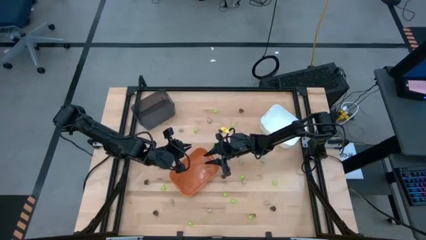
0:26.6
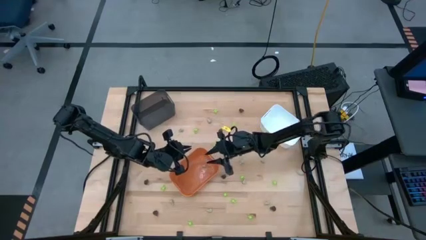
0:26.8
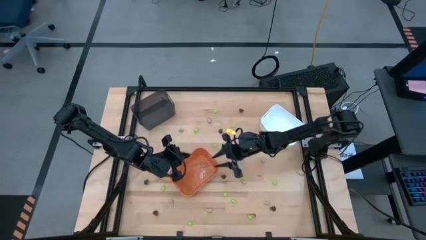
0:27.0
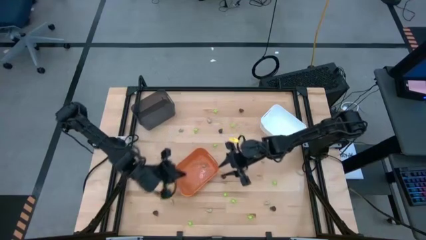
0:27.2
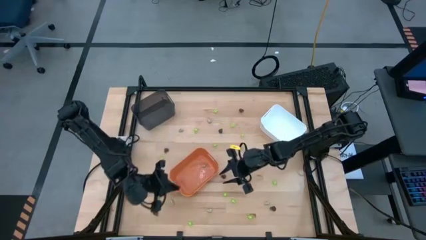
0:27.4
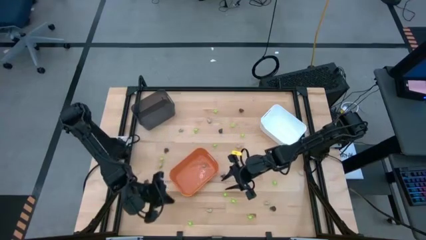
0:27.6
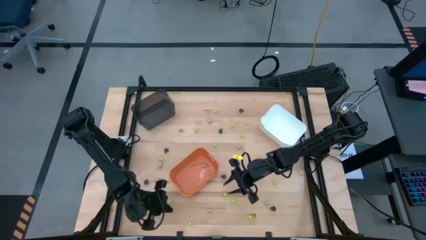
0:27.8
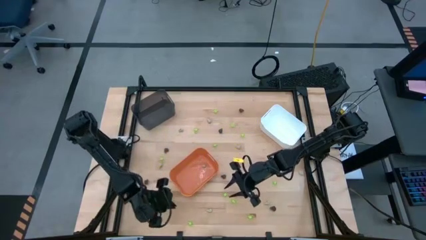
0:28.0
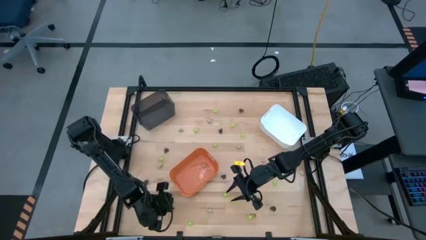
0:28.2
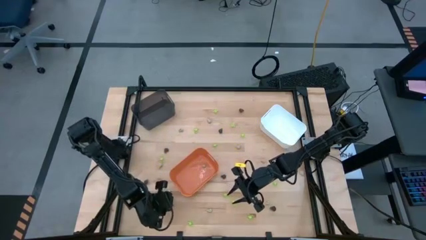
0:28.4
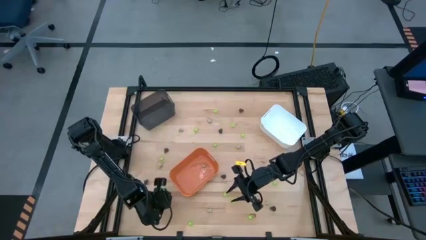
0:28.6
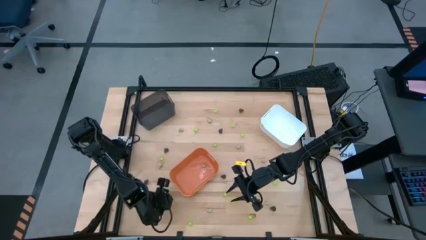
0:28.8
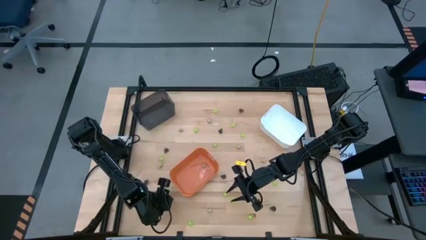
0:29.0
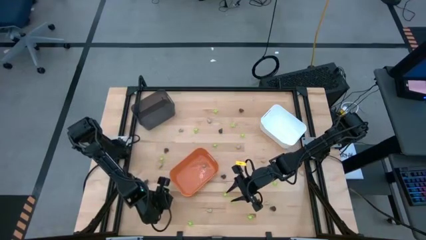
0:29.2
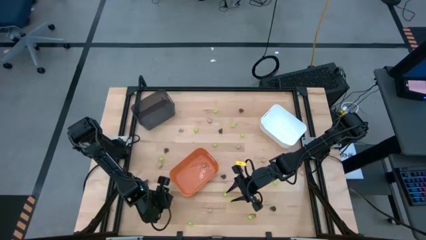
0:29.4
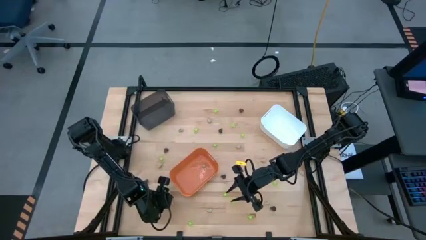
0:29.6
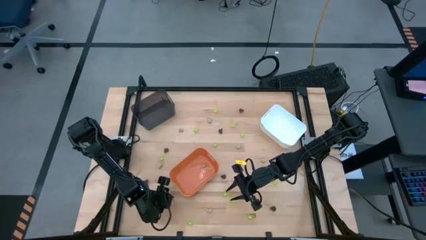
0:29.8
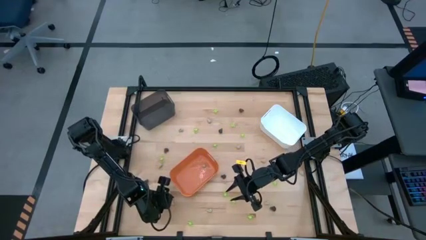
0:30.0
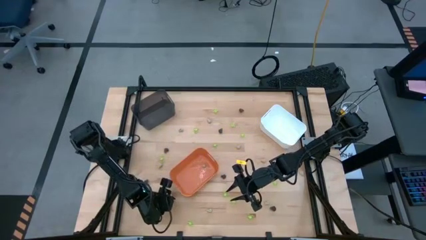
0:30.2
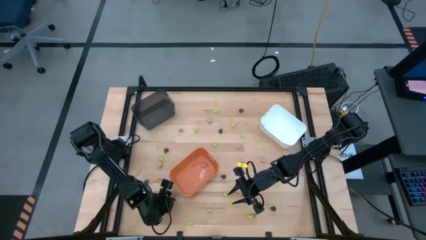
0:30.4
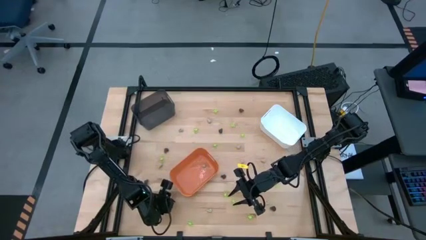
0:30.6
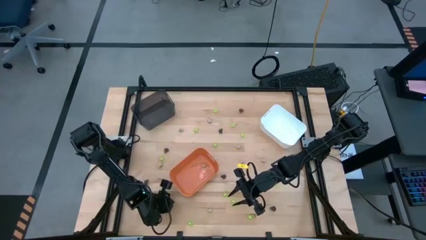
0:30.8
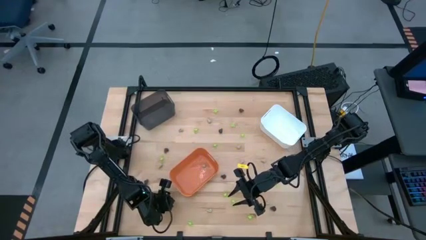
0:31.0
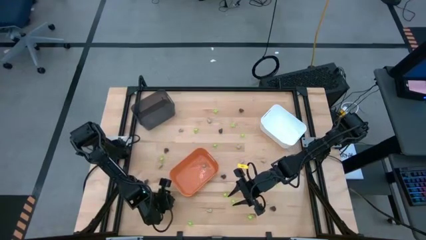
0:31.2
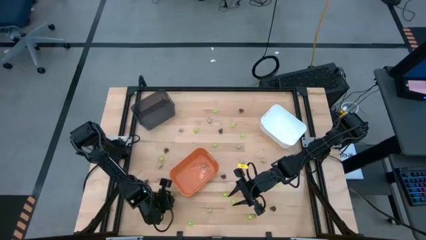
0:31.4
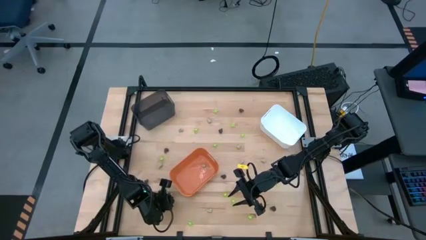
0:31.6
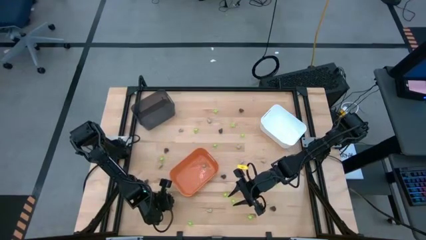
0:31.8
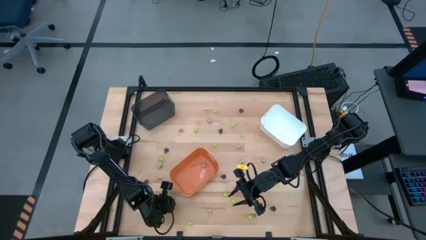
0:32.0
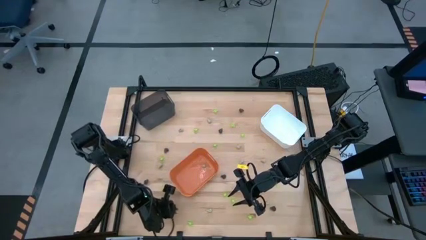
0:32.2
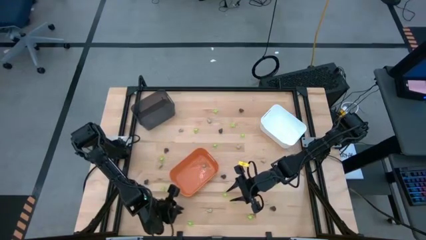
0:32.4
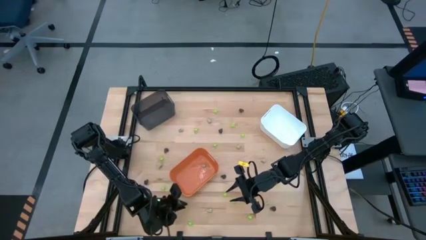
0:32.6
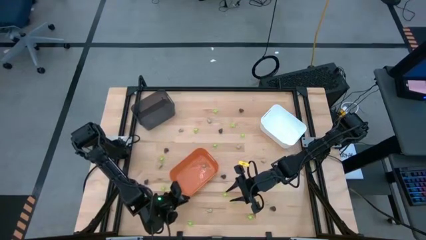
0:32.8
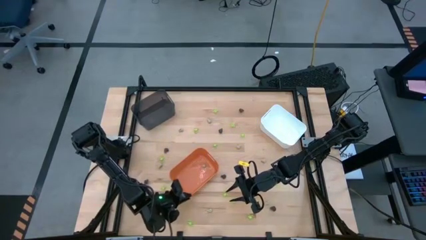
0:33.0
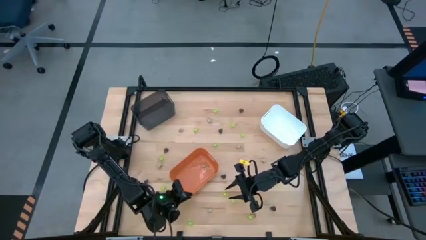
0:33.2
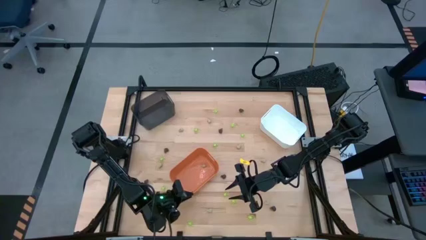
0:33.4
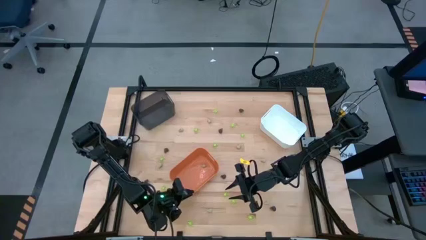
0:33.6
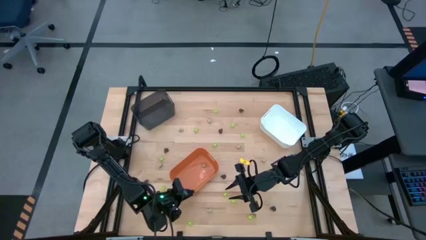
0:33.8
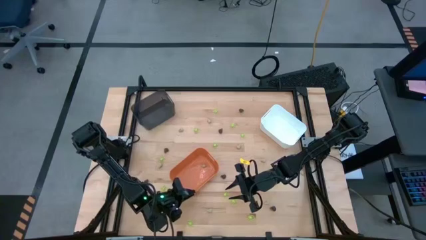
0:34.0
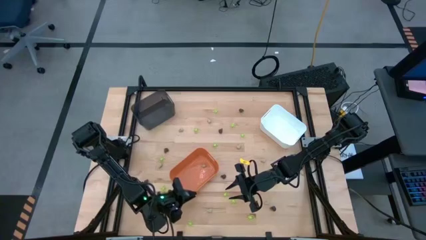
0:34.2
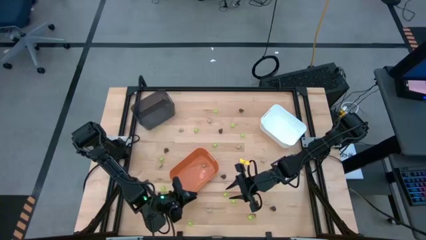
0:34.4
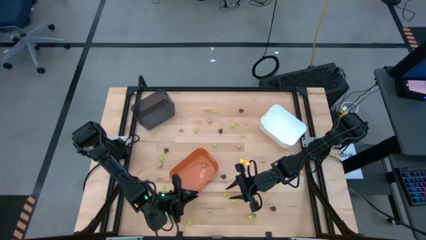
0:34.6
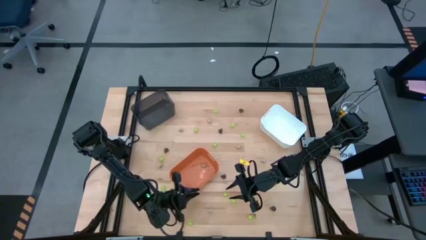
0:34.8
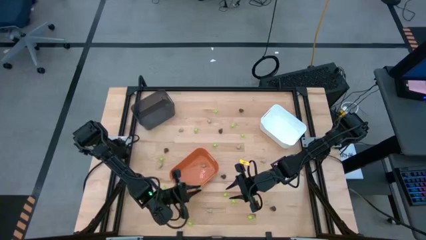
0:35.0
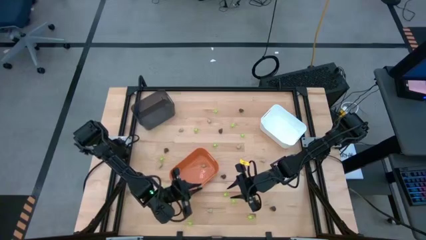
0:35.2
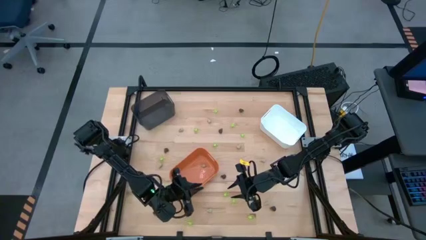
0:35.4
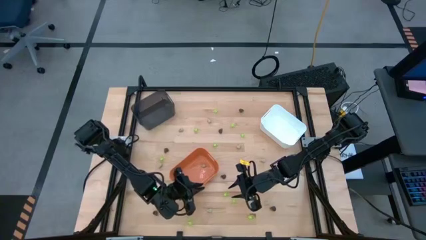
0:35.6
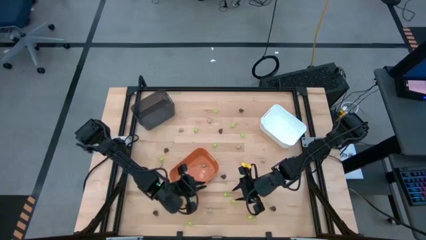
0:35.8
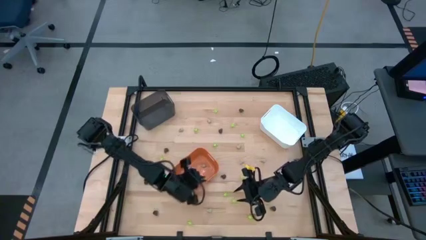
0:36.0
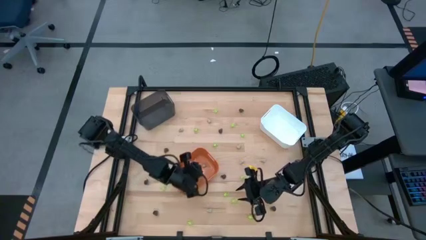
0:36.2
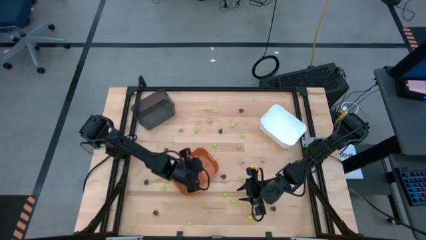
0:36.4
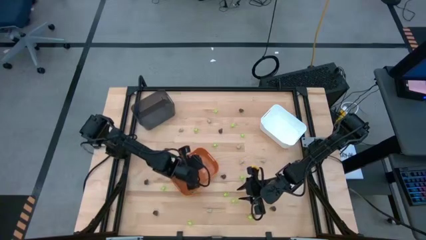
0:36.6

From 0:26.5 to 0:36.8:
Task: Sort Halloween decoration
Put the small white skull toy into the orange bin

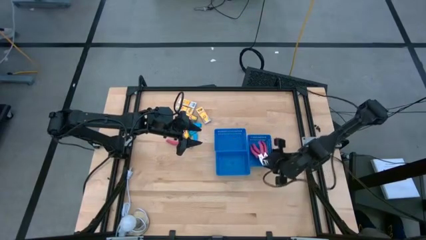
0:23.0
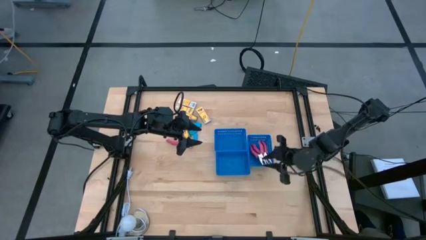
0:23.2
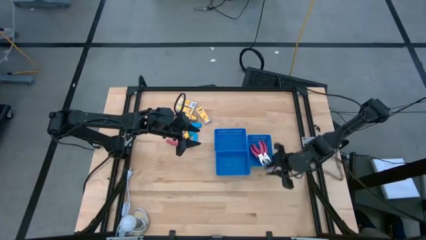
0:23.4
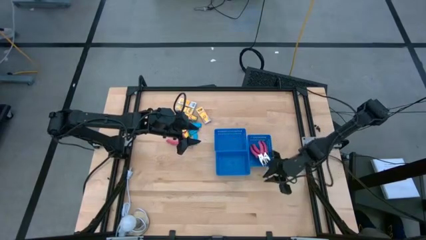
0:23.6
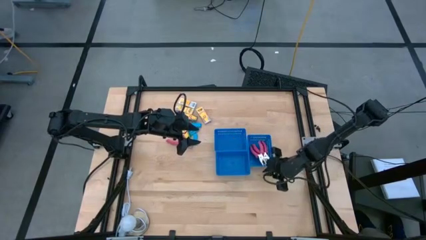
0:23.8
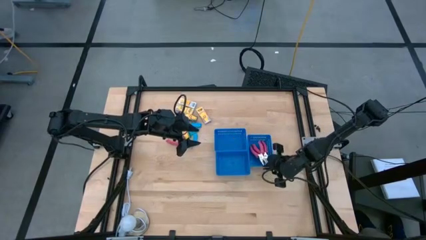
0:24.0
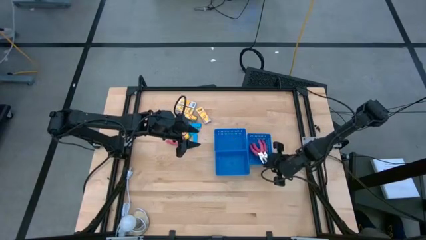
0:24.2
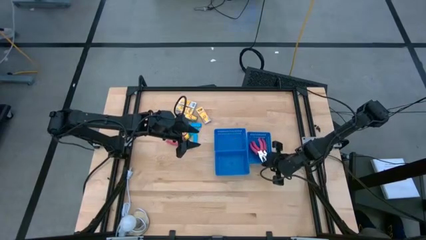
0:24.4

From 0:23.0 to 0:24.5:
Task: Pick & Place School Supplies
Adjust the right vertical blue bin
